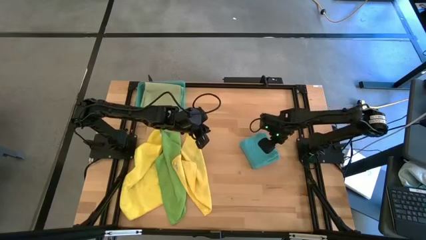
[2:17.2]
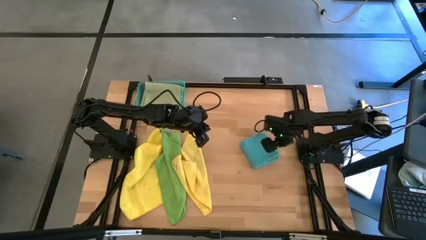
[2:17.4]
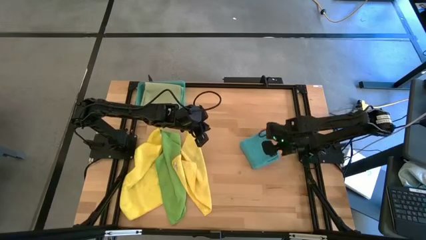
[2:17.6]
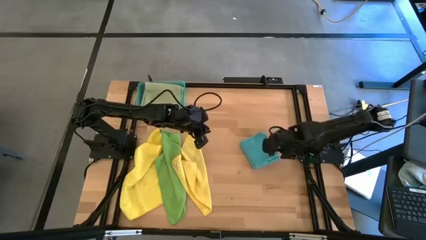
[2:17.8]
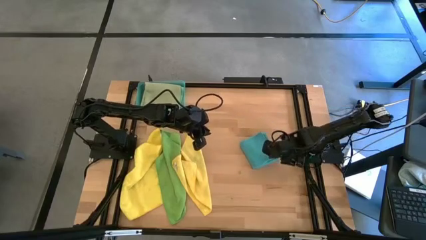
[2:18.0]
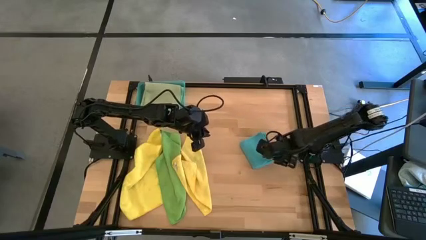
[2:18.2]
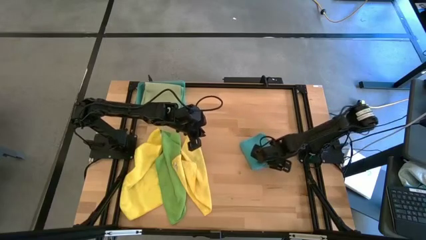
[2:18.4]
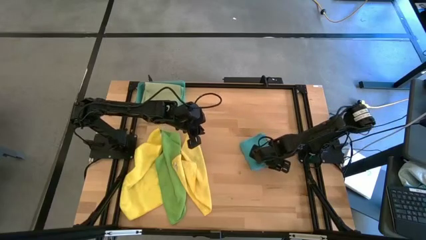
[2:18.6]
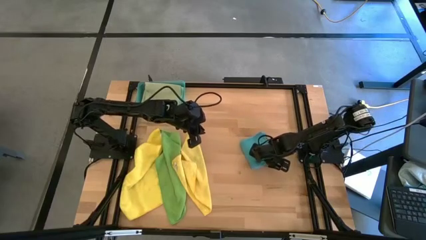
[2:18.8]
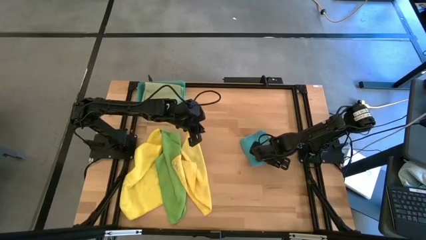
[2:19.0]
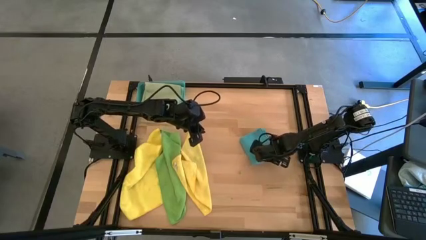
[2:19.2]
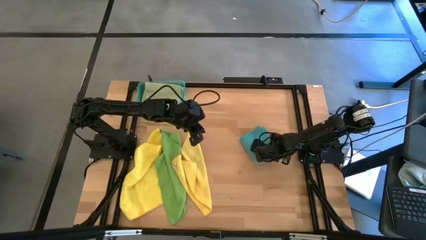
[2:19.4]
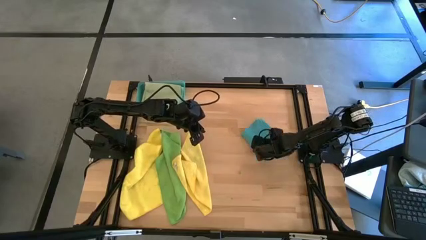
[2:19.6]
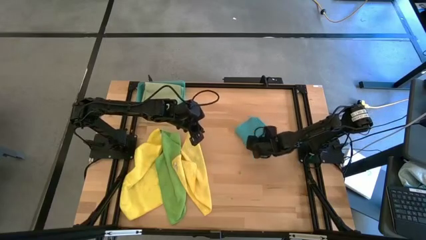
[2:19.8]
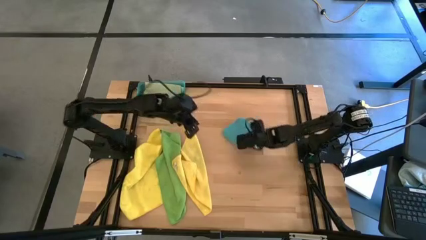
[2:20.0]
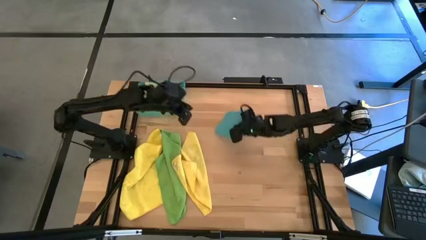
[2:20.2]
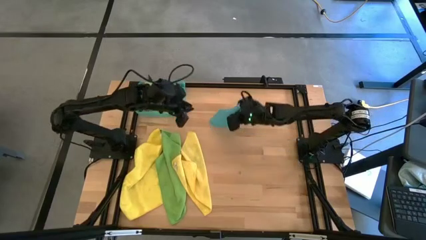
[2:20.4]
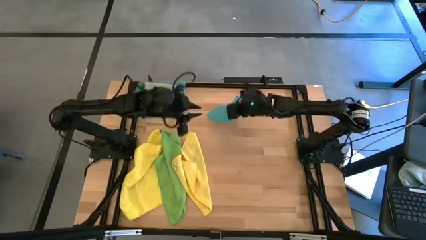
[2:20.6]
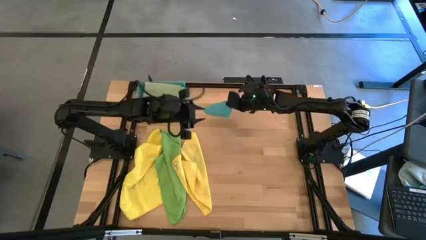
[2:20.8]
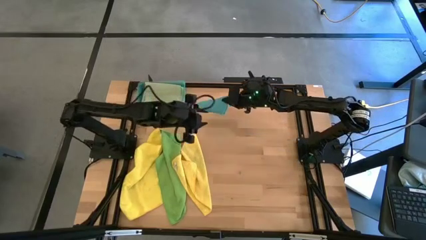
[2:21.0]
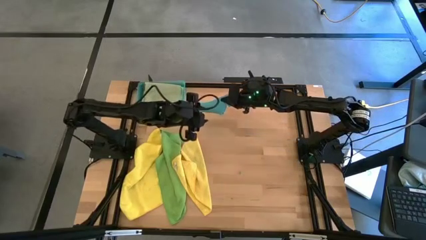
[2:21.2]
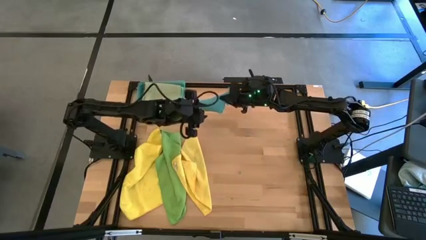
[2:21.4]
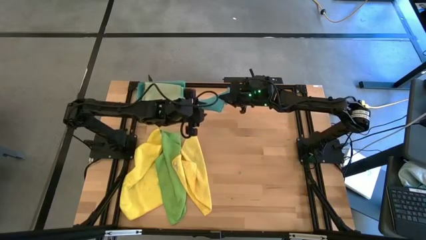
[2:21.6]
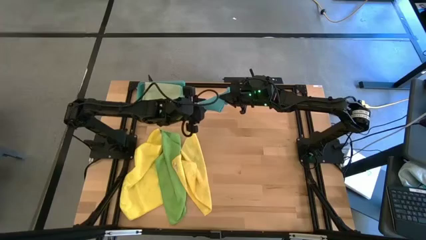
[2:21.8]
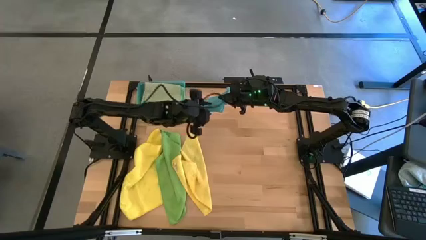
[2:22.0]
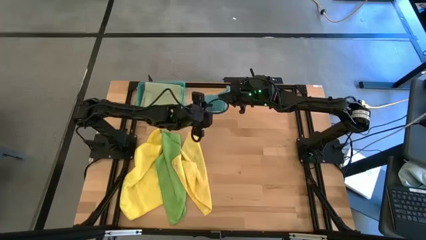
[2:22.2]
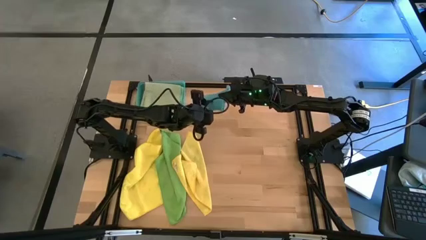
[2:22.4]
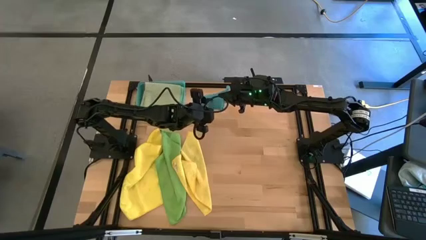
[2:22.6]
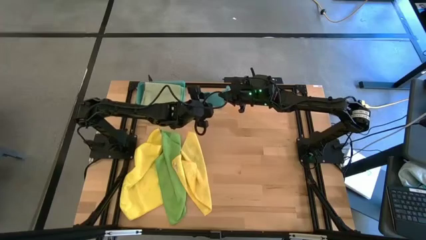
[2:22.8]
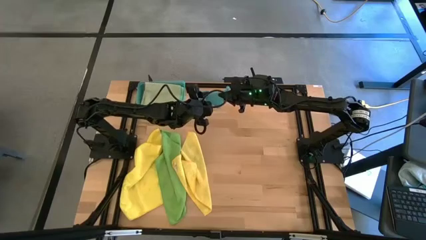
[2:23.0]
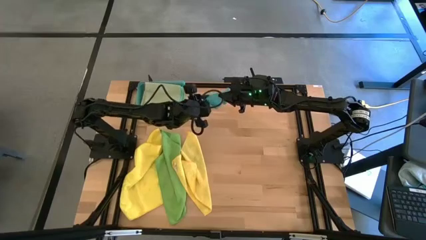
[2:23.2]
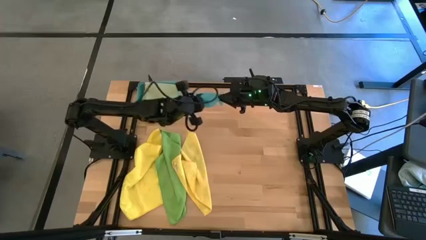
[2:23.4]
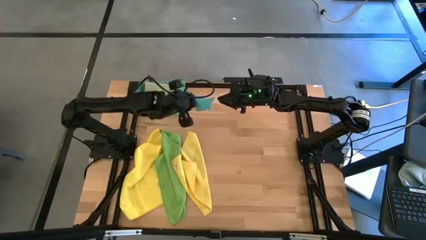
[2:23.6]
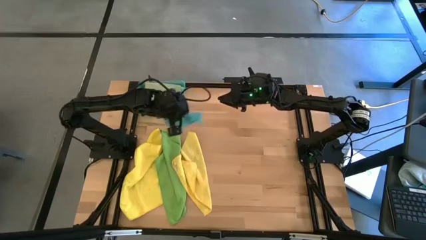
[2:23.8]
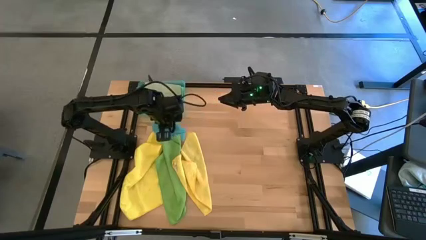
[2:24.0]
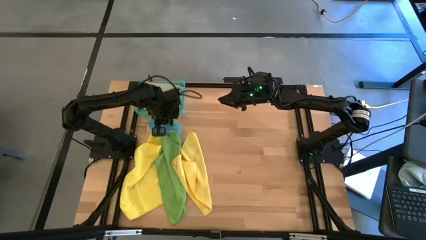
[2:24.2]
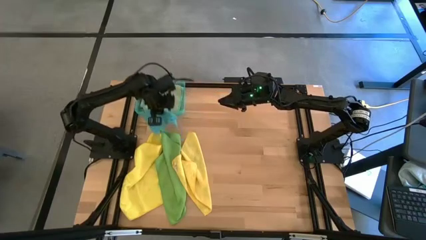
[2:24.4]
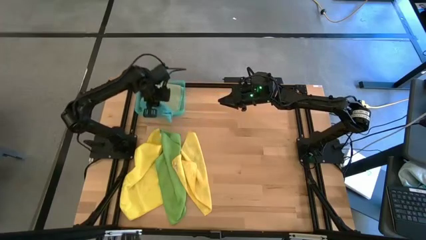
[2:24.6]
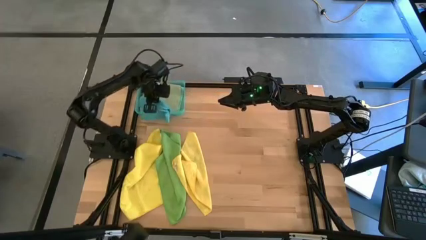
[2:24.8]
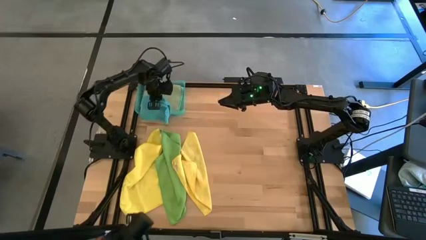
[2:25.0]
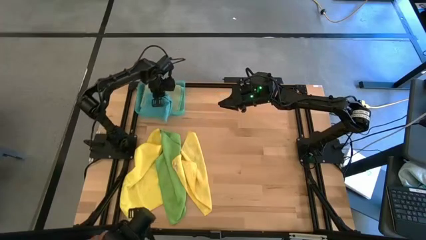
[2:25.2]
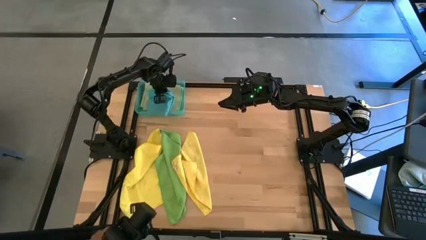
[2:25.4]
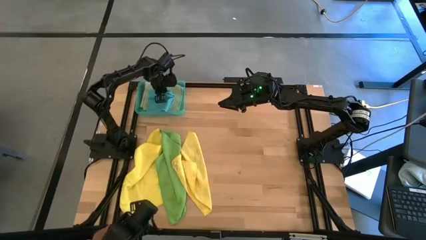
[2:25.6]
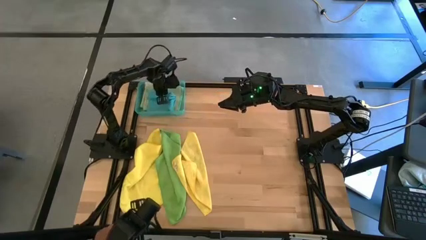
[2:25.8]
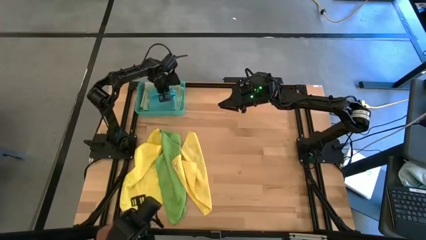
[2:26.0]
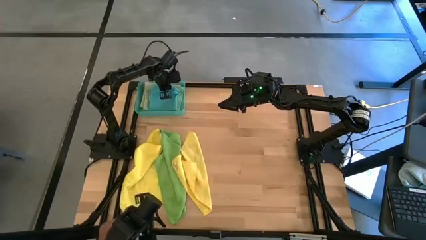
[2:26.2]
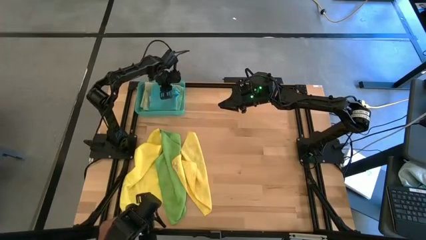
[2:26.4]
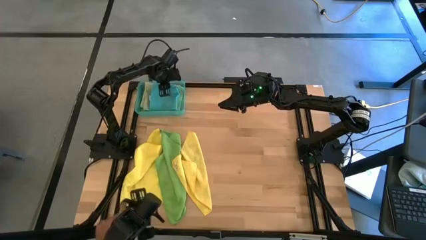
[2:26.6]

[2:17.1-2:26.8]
Task: Fold microfiber towels
Stack the folded blue microfiber cloth on top of the light green microfiber cloth in the blue bin

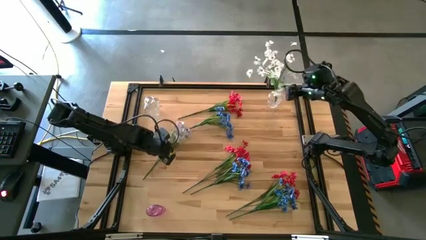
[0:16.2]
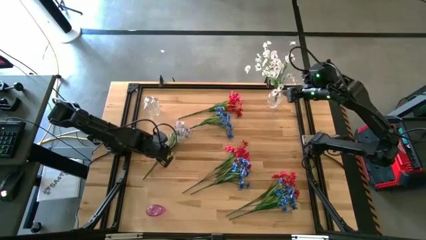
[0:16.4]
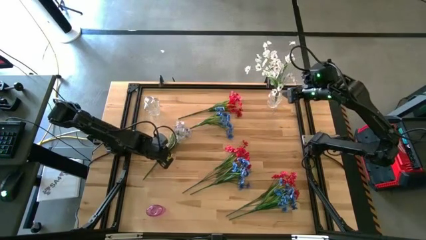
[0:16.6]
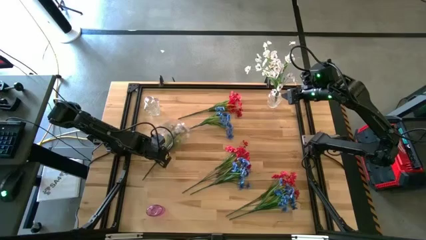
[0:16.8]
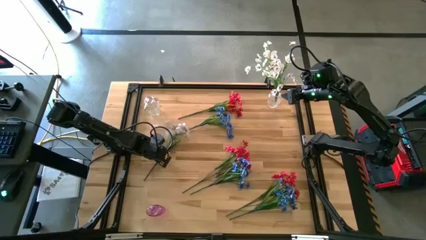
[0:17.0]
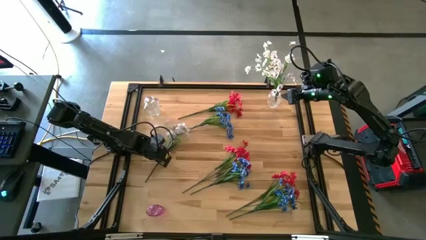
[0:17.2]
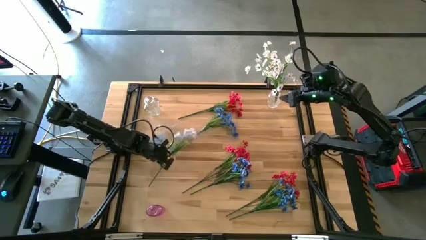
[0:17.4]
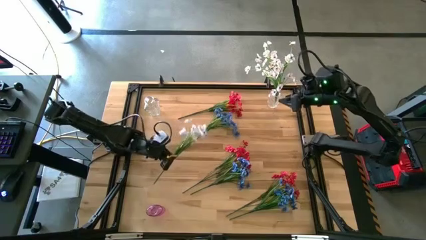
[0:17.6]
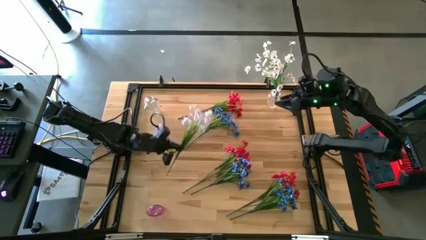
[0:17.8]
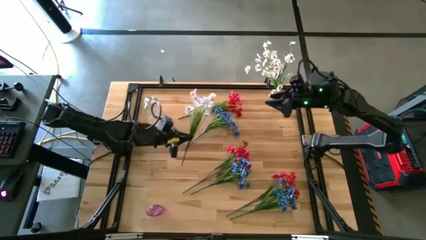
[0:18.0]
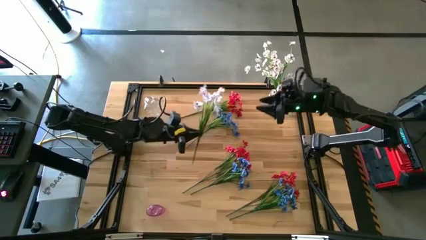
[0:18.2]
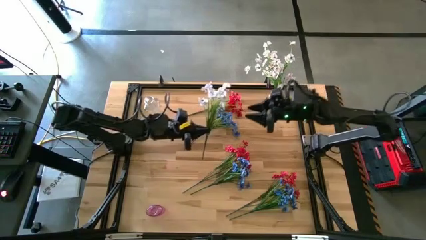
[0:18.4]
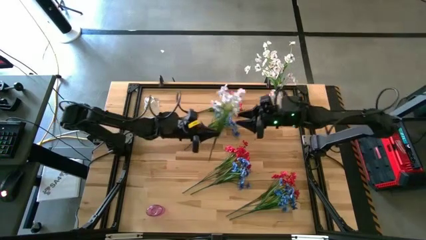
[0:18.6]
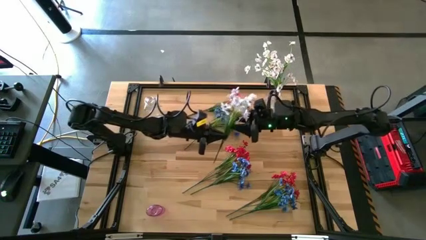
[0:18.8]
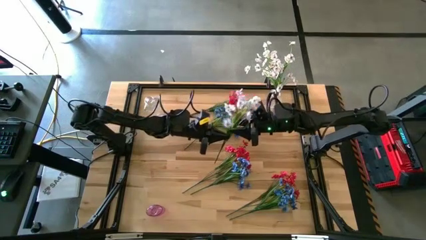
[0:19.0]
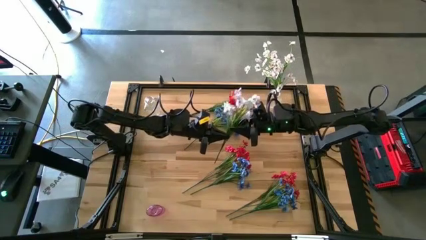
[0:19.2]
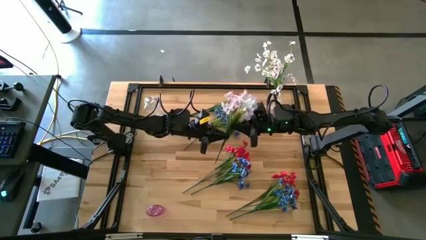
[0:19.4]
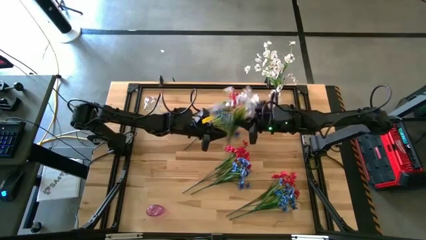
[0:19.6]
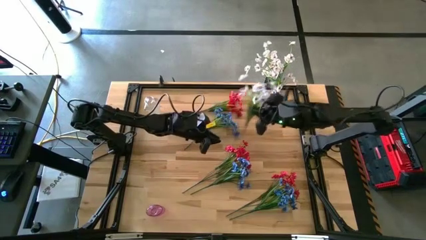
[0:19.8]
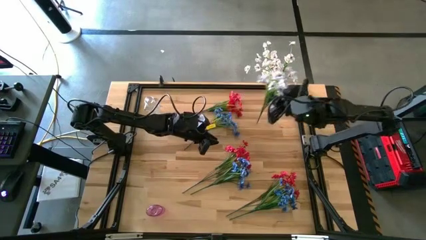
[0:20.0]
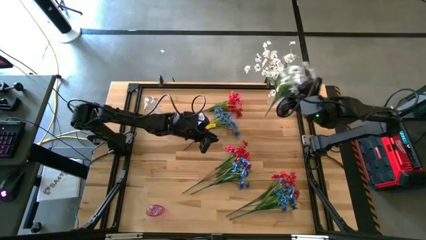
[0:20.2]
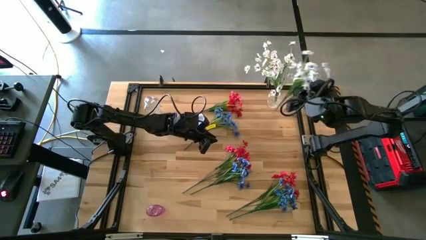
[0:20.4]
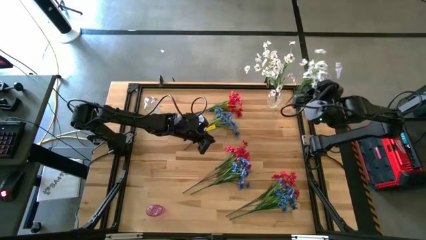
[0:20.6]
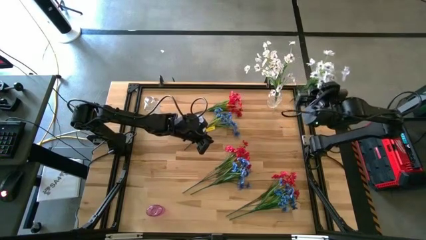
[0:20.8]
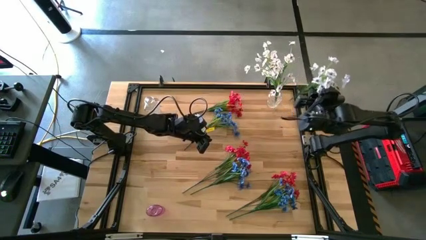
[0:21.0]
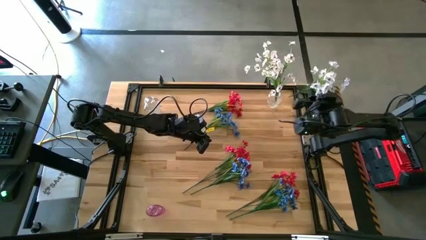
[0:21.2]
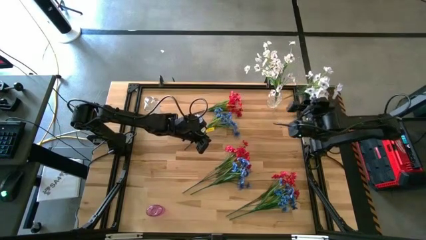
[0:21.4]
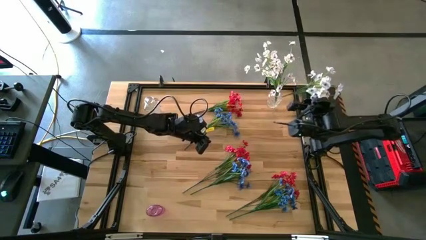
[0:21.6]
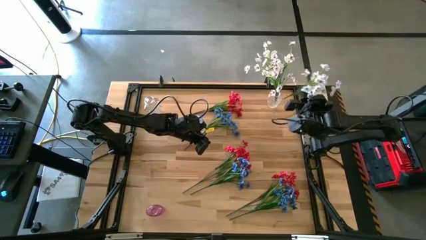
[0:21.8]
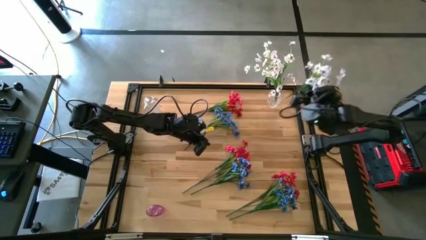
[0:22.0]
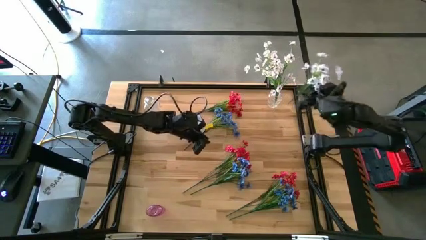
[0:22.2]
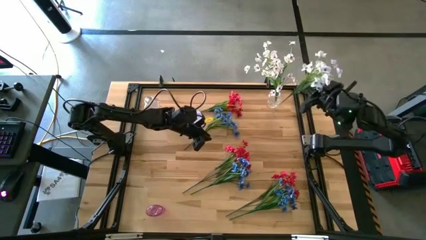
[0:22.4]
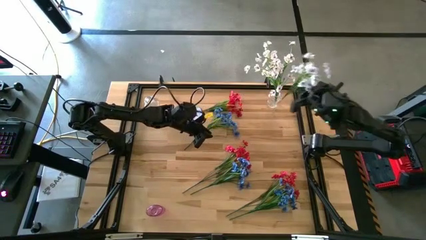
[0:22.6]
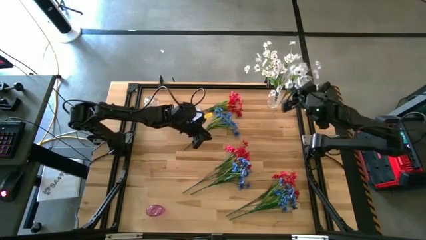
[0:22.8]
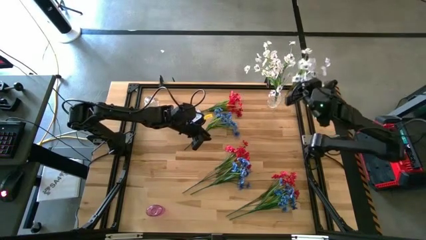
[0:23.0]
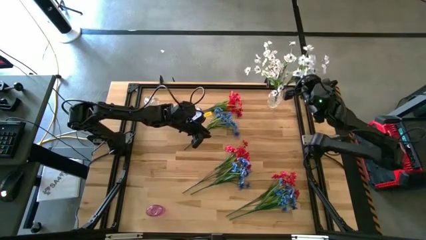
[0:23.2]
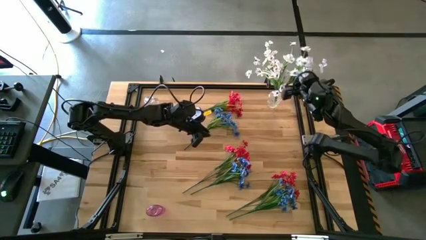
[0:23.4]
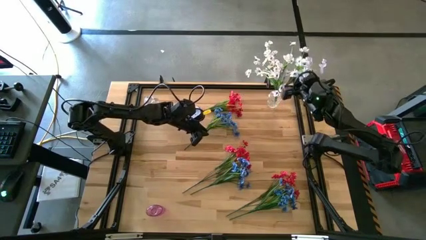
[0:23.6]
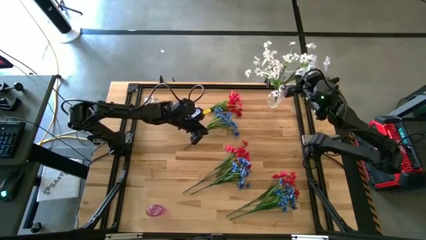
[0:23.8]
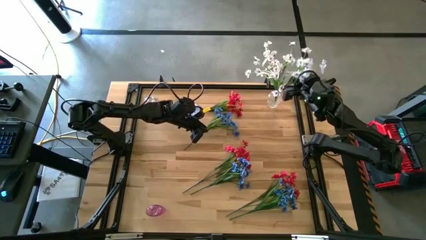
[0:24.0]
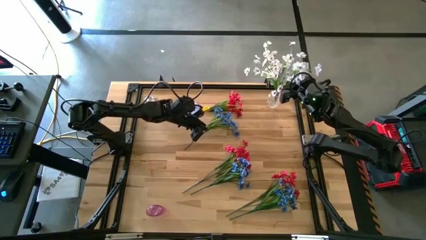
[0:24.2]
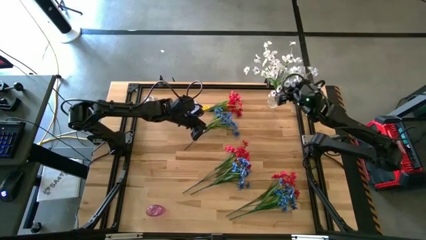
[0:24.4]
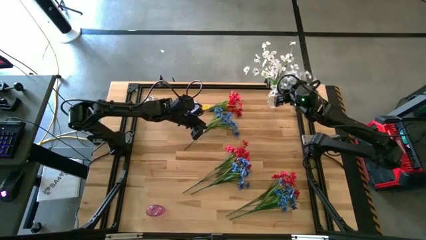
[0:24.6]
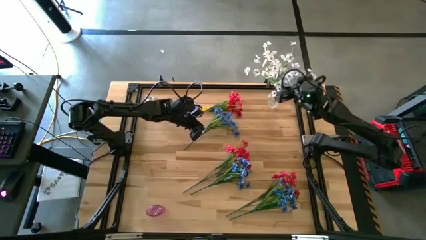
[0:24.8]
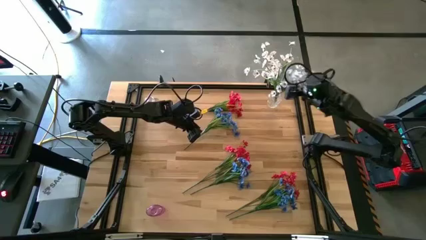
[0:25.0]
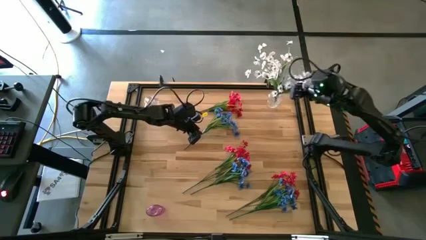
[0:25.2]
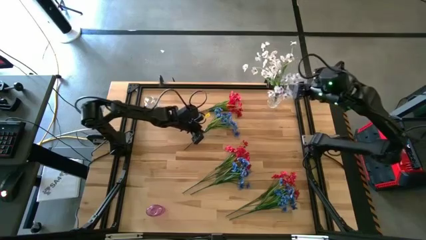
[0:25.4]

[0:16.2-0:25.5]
Task: Sort flowers into vase by color
Put the white flowers into the right transparent vase
